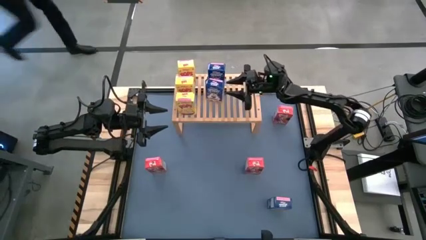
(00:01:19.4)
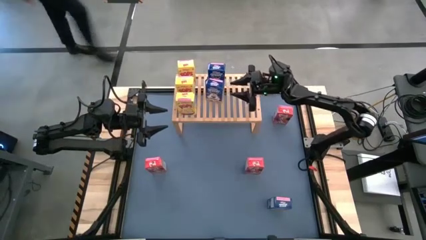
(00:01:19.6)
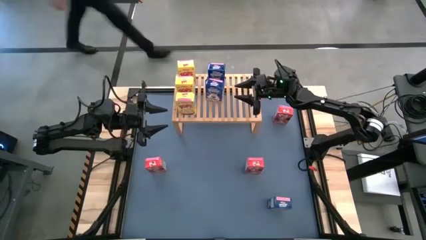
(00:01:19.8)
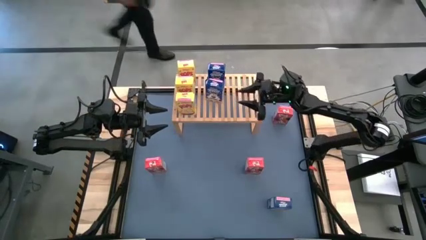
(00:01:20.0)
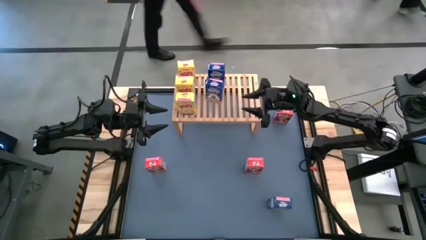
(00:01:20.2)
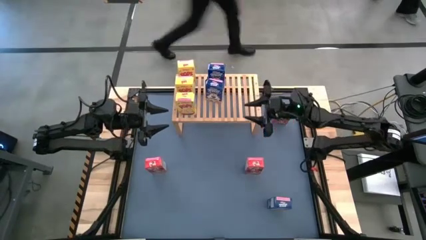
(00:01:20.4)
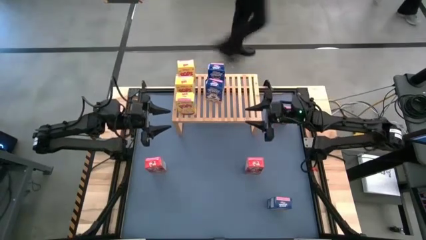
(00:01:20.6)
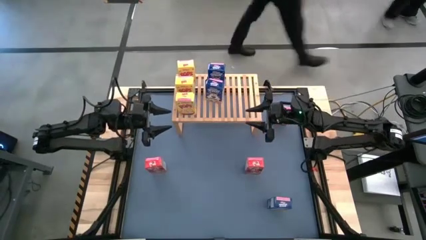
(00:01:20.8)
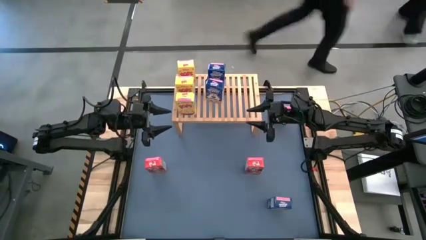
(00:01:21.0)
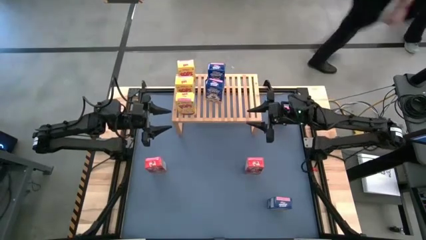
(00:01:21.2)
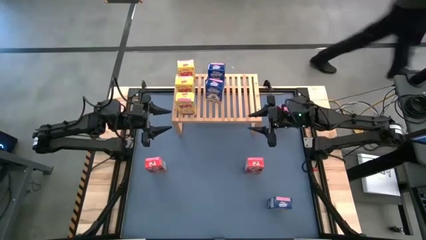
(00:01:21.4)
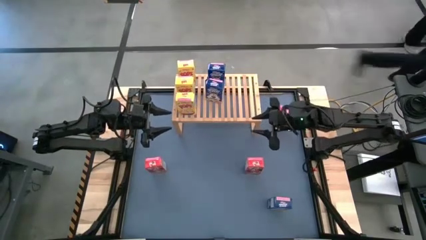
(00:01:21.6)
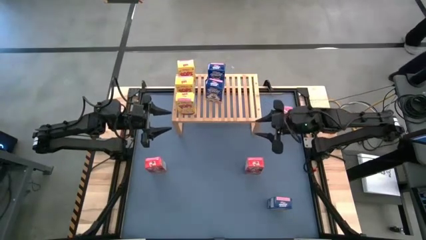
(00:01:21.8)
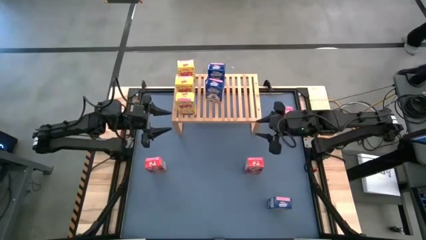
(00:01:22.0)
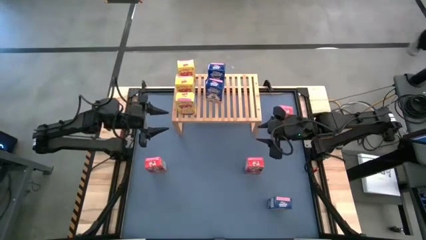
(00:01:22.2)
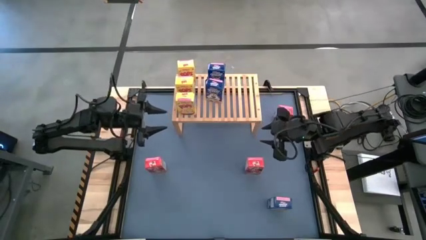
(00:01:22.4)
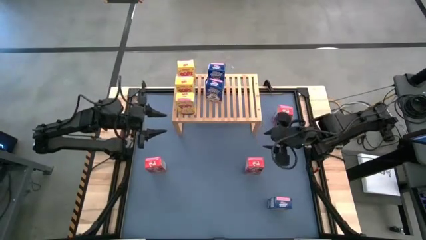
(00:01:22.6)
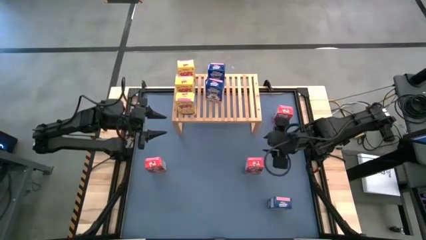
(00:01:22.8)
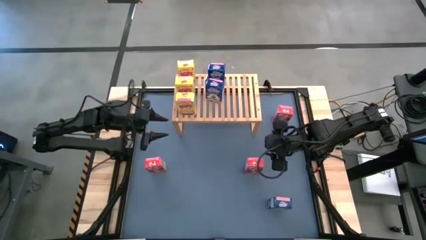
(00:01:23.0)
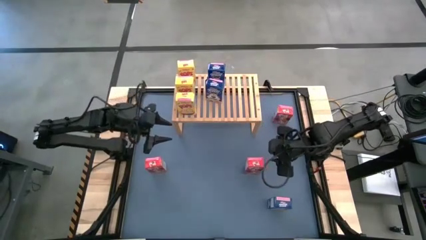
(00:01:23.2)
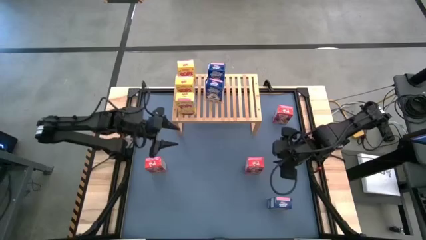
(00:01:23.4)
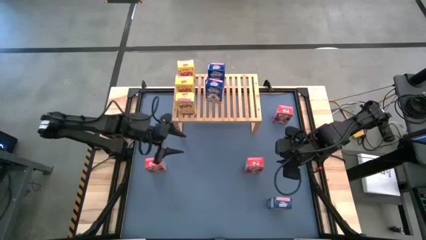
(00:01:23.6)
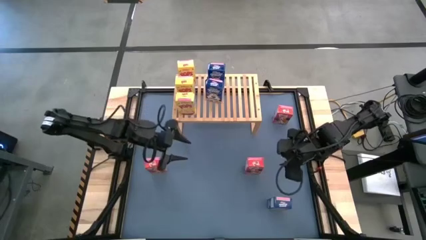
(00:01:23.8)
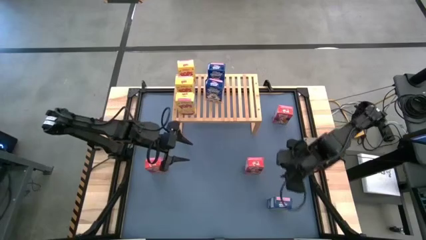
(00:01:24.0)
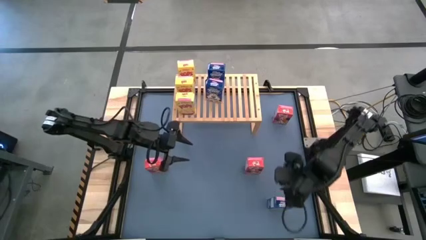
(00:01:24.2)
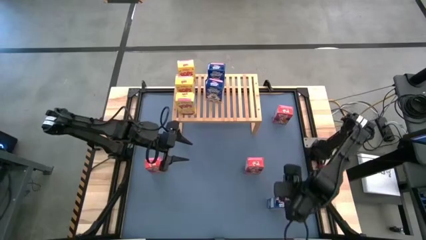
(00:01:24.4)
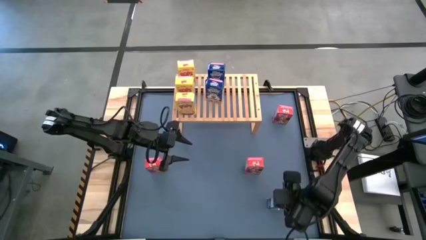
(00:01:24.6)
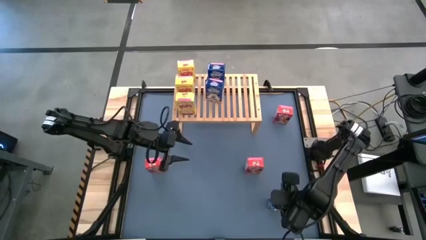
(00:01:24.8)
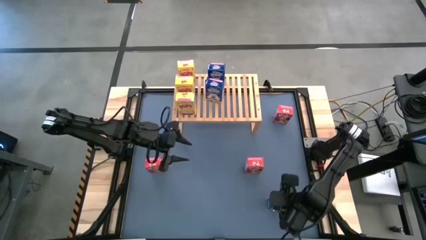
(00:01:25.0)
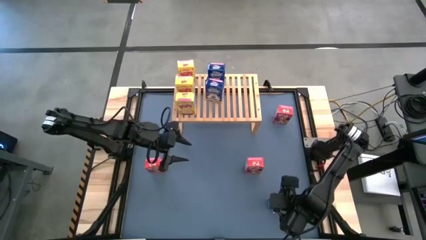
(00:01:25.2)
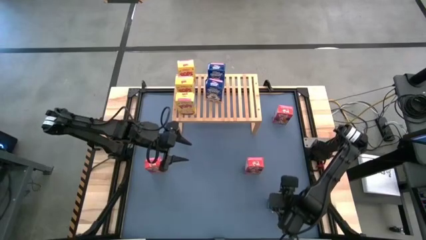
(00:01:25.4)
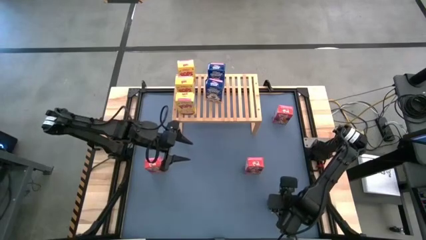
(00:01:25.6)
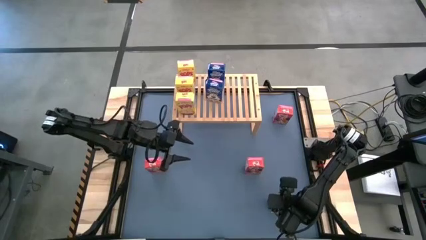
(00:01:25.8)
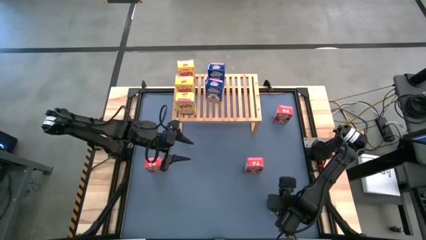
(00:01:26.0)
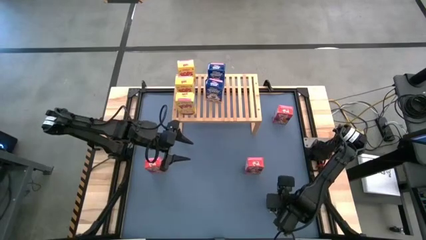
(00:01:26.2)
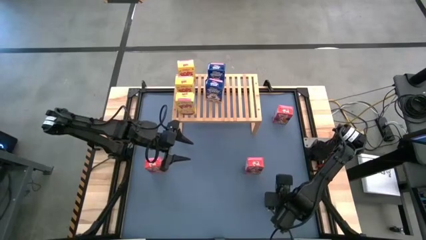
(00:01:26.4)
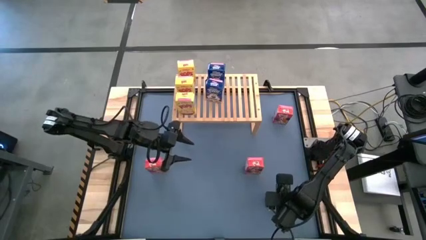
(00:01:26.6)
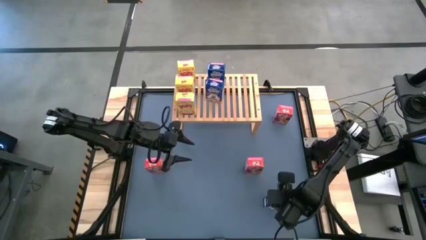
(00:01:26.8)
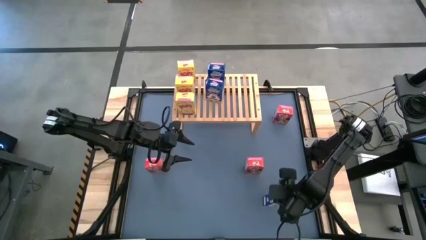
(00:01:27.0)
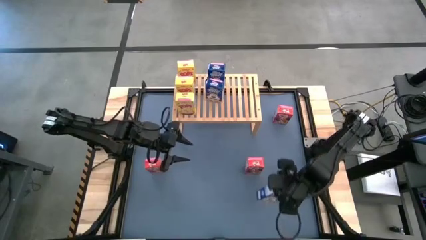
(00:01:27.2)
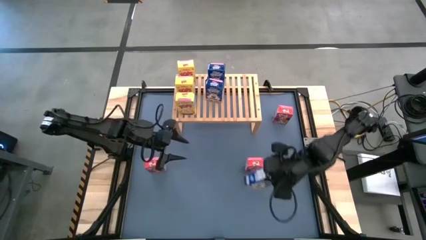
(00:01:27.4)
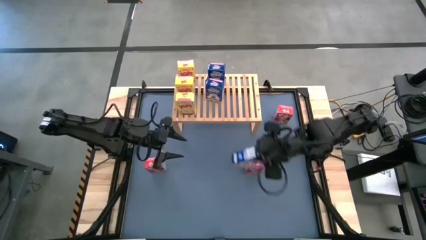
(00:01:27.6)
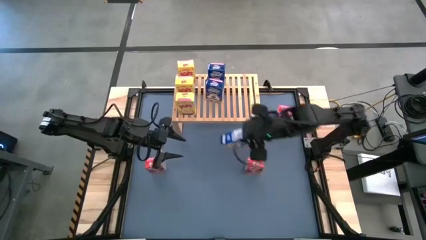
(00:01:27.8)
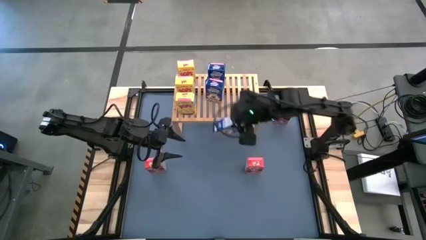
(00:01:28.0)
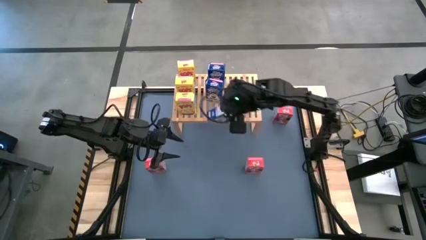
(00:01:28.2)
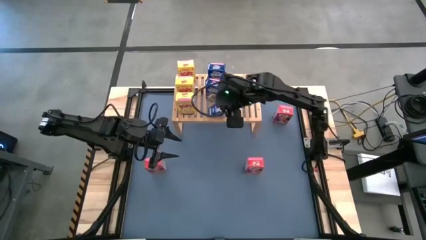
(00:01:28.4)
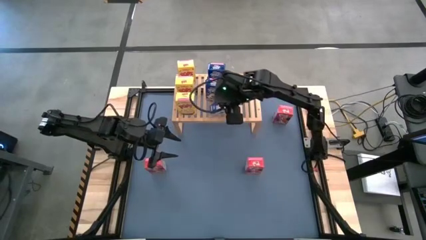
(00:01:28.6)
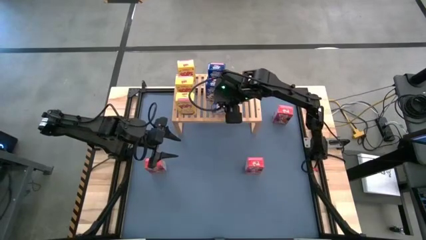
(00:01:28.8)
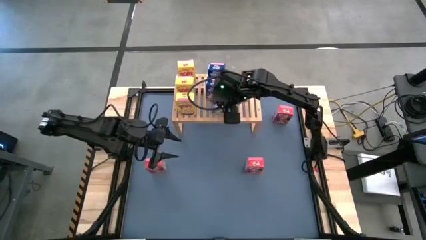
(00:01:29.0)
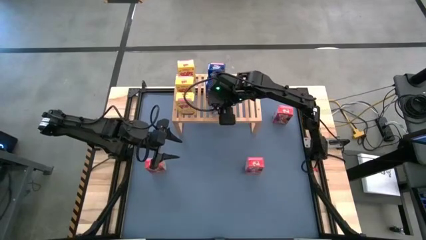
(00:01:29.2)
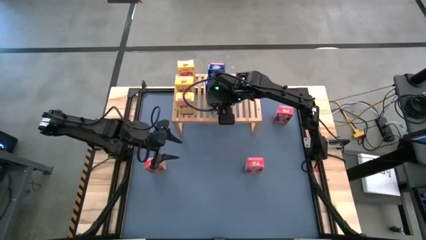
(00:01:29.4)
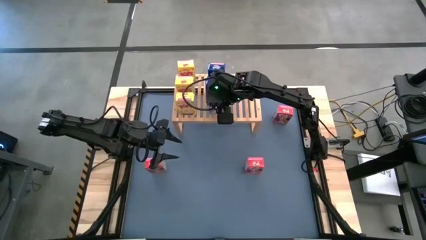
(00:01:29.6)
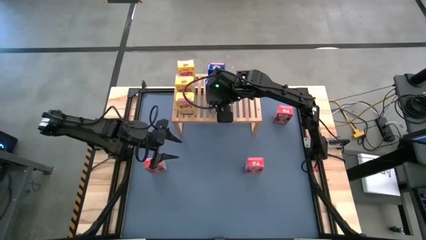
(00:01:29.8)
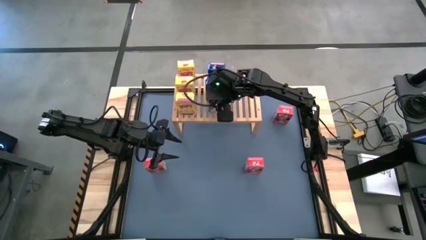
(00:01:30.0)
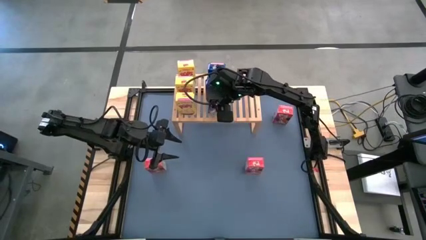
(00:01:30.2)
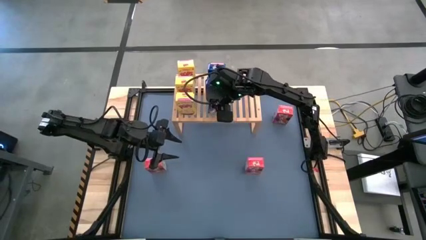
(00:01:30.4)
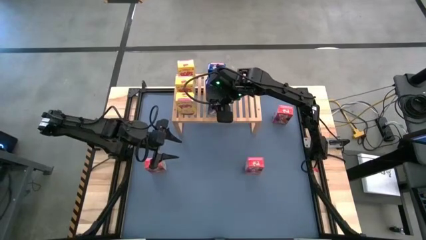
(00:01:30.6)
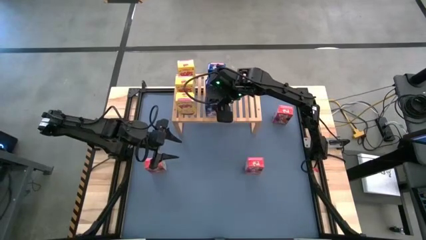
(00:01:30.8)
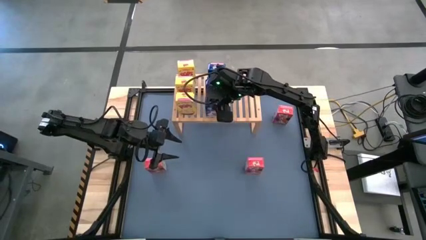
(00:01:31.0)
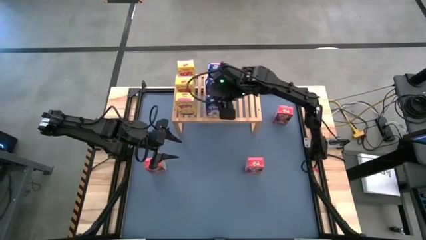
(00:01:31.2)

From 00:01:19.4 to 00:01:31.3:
Task: Stack cereal on shelf
Put the blue cereal box on the shelf aligned with the other blue cereal boxes

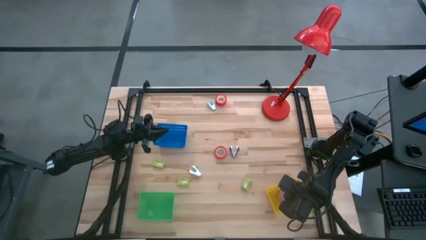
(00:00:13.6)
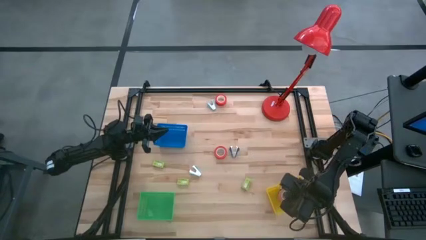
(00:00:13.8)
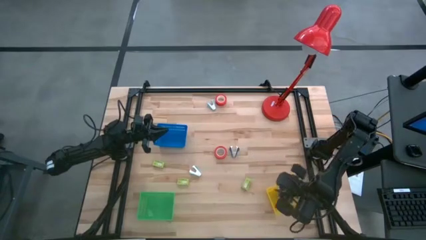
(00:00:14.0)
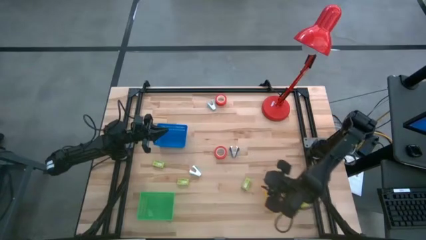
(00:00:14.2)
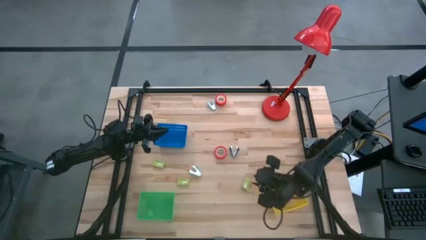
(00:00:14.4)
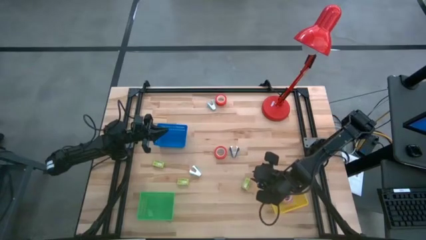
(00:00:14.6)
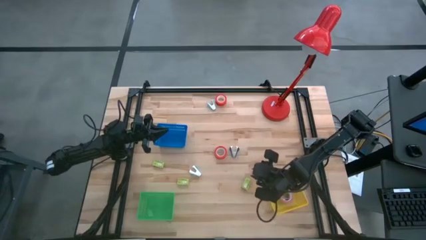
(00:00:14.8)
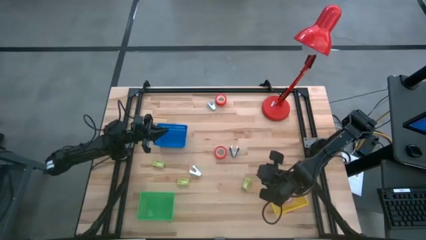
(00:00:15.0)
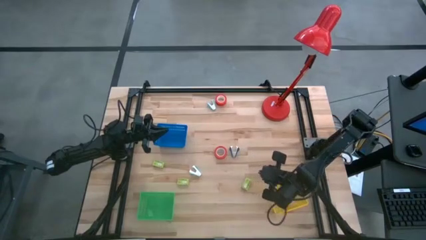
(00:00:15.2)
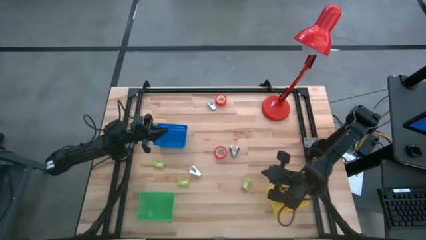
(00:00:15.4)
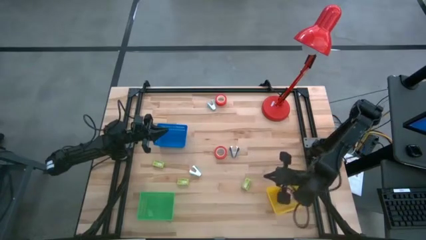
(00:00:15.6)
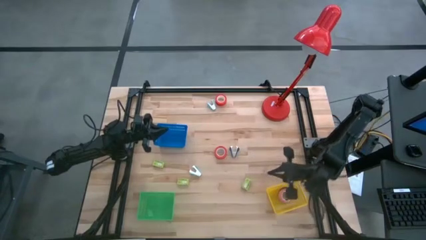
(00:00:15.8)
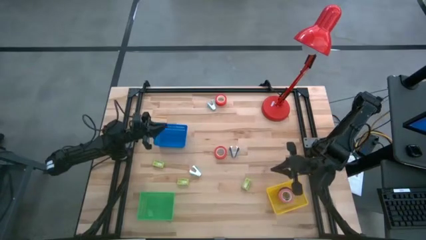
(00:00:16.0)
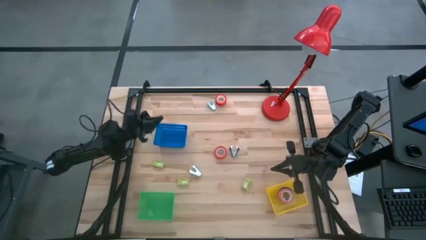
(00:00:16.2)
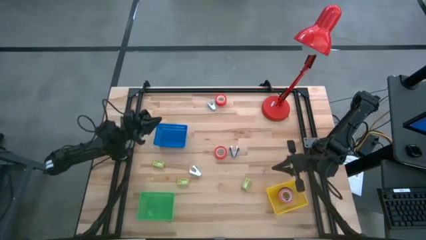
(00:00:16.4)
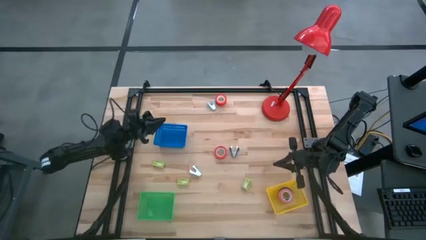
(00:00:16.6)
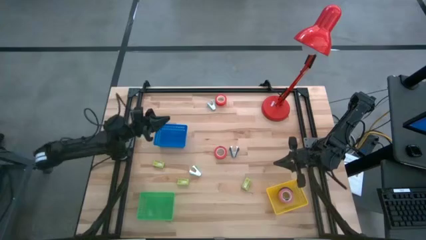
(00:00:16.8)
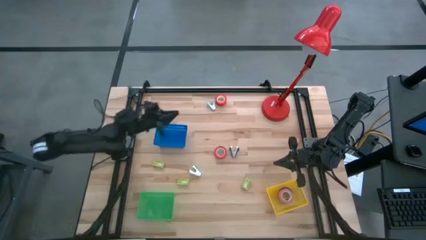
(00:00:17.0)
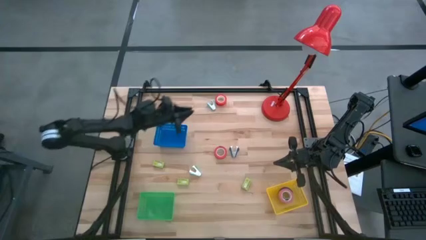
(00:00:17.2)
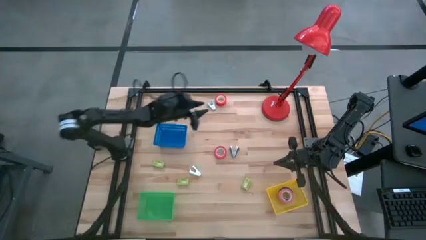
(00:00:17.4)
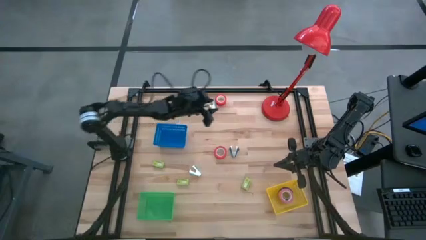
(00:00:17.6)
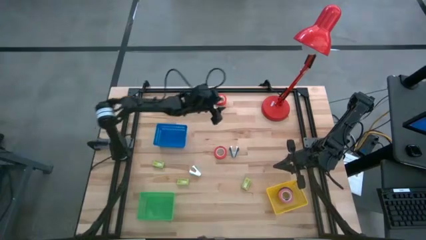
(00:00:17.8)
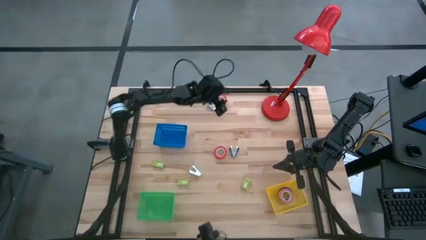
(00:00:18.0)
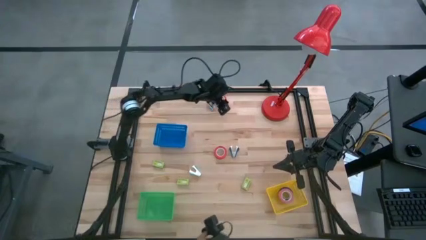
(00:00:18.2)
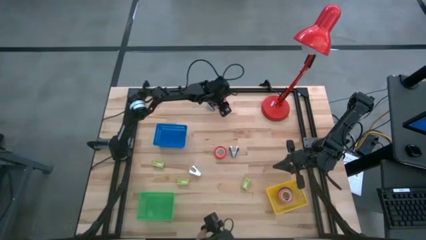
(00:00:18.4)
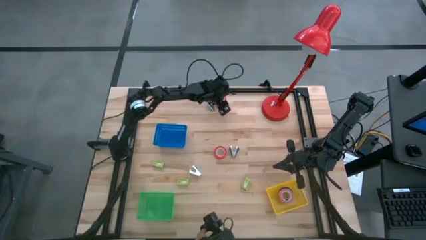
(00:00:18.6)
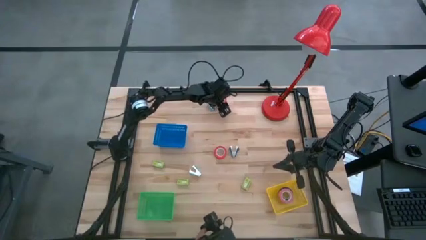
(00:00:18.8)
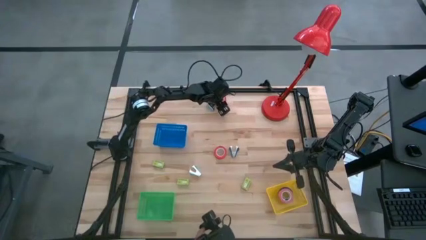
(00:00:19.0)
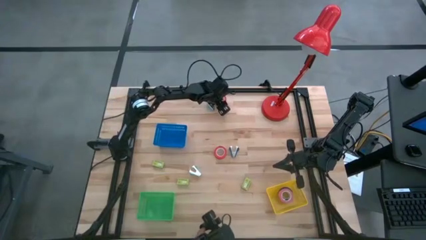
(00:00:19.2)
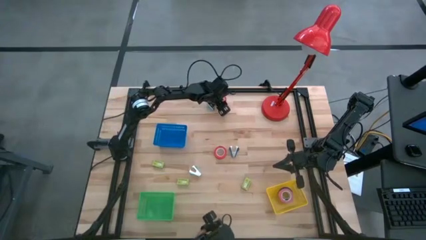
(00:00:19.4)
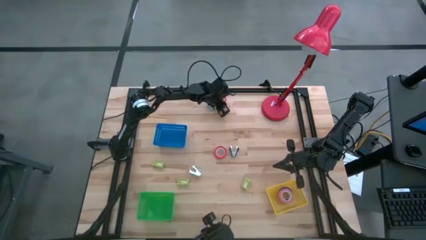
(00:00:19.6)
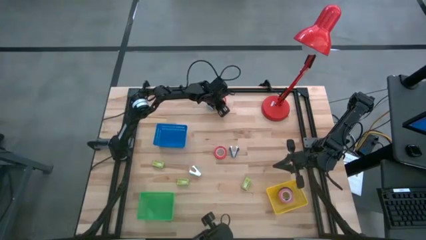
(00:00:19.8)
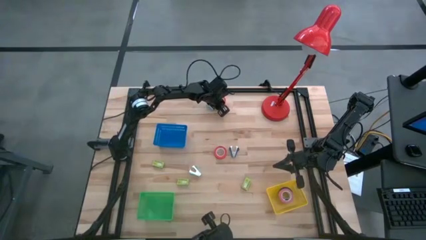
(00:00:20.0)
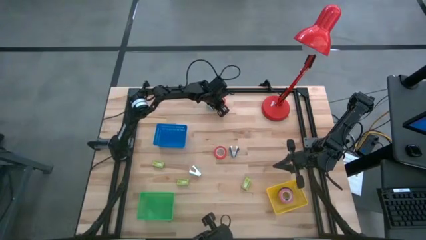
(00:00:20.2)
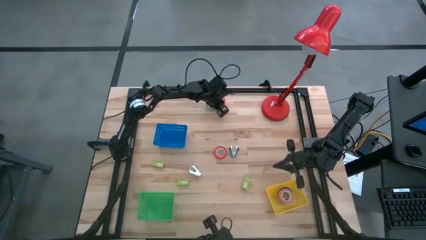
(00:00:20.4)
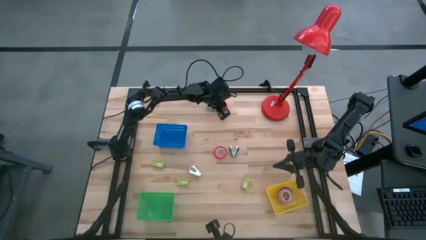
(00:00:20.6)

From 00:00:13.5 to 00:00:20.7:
Task: Pick and place Stapler, Stapler remover, tape
Put the top orange tape into the yellow bin
